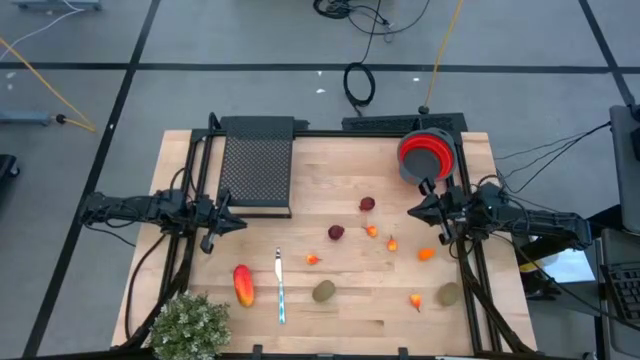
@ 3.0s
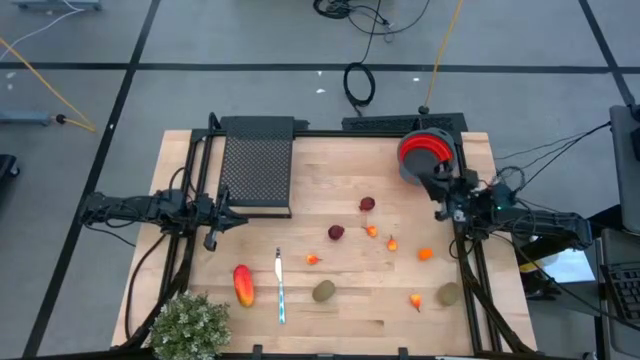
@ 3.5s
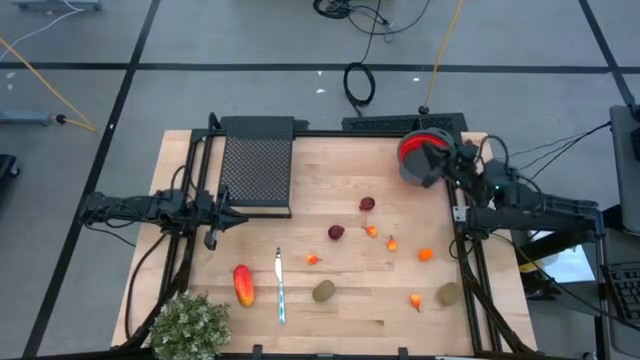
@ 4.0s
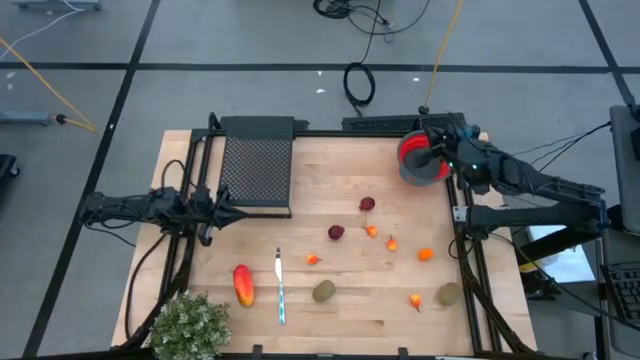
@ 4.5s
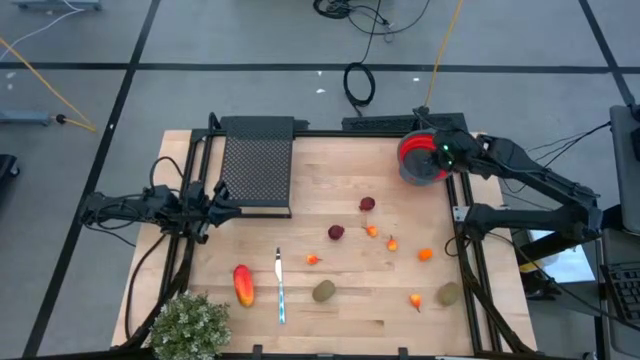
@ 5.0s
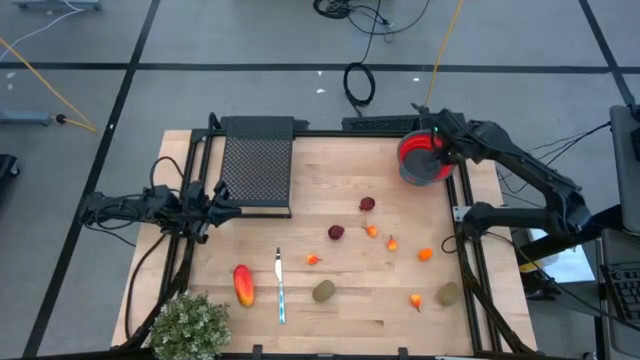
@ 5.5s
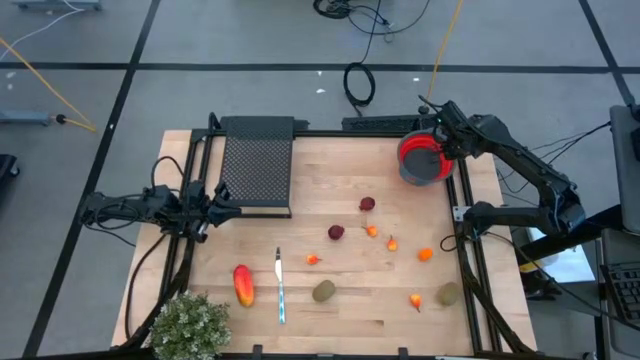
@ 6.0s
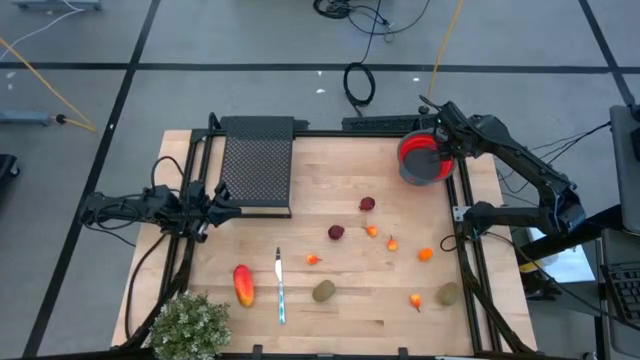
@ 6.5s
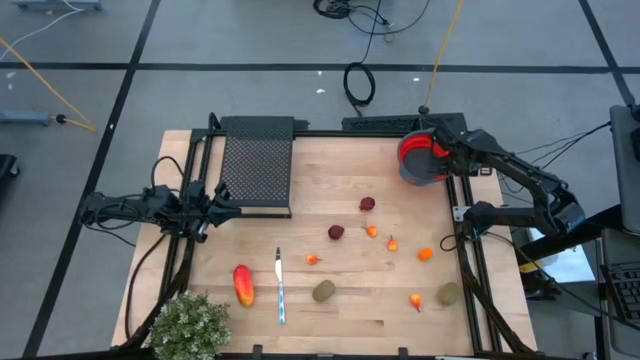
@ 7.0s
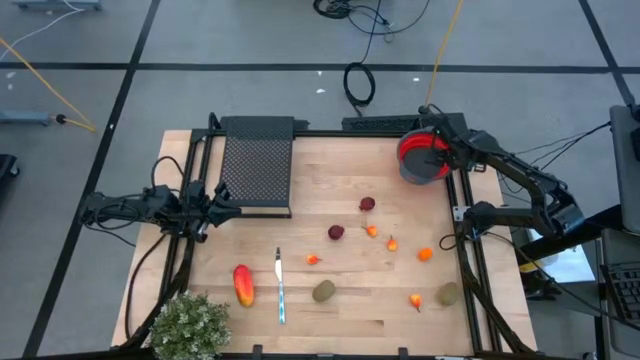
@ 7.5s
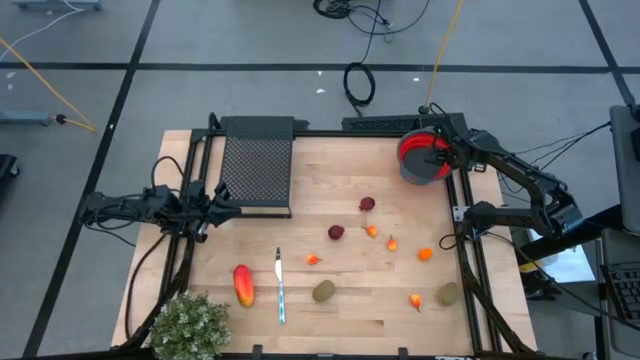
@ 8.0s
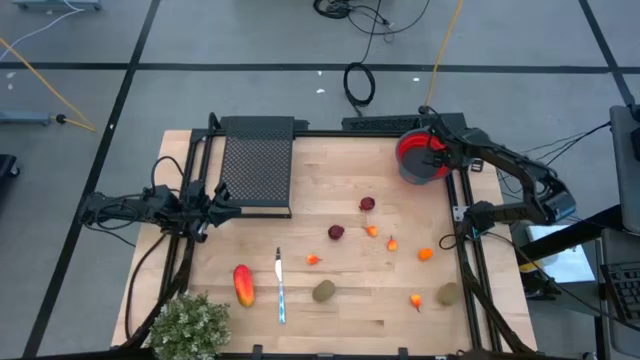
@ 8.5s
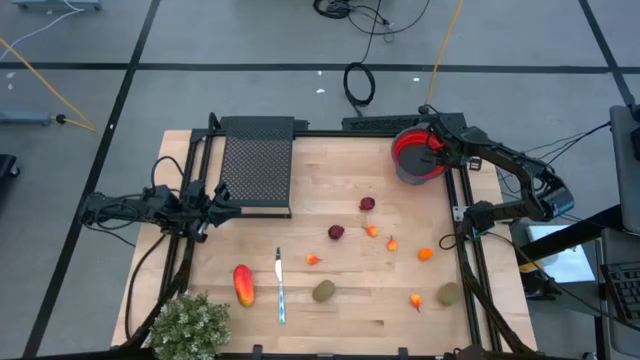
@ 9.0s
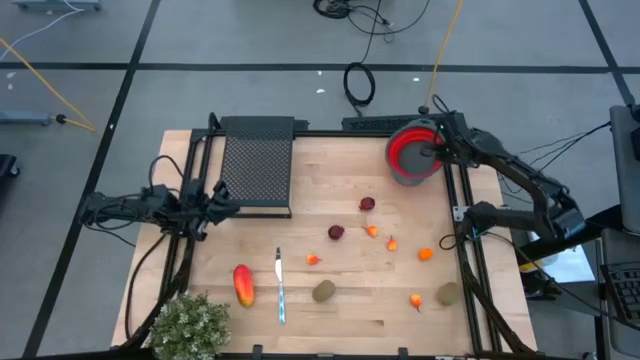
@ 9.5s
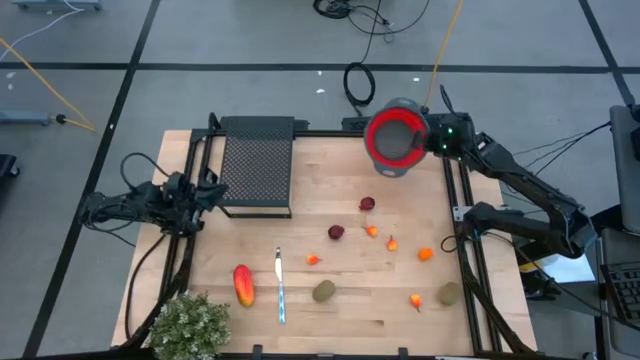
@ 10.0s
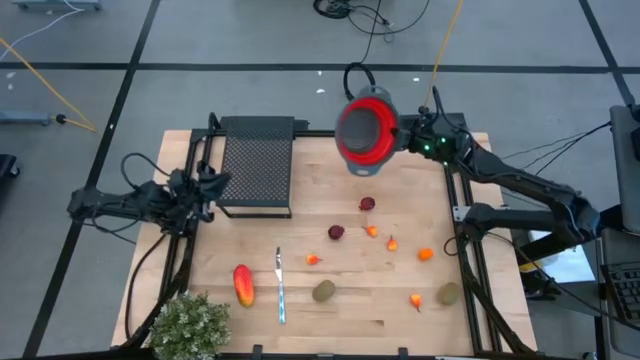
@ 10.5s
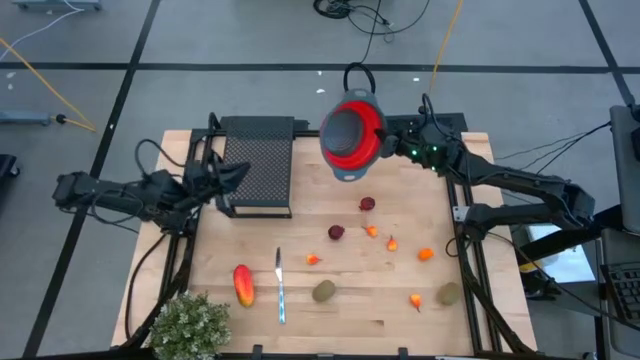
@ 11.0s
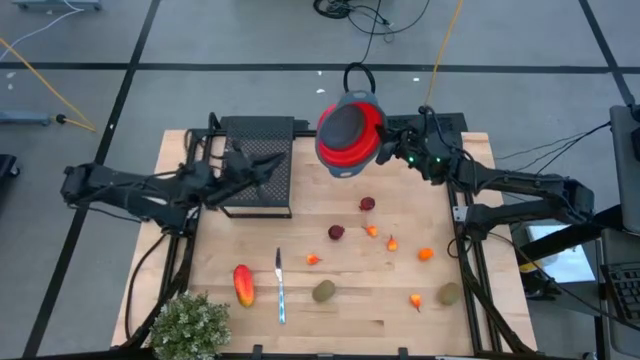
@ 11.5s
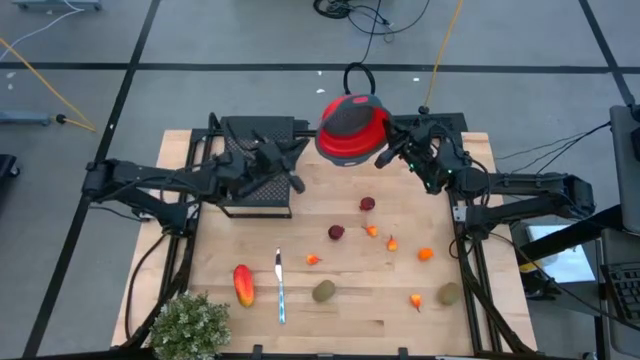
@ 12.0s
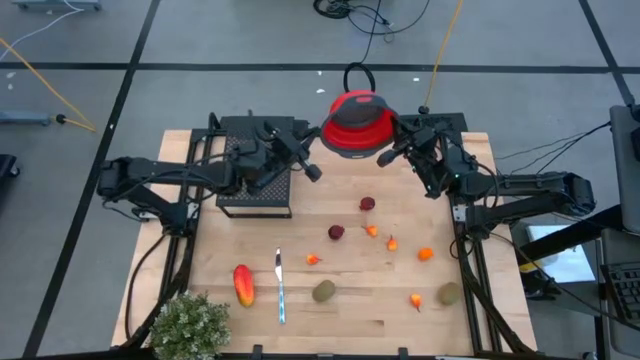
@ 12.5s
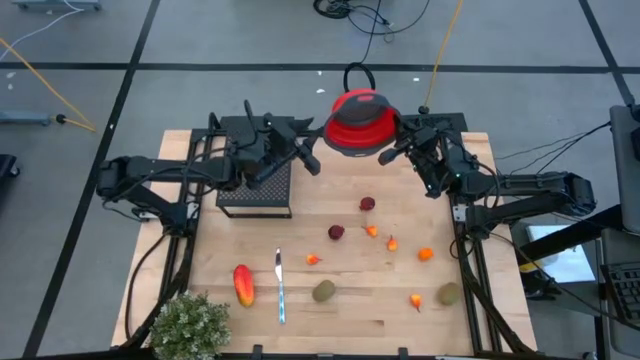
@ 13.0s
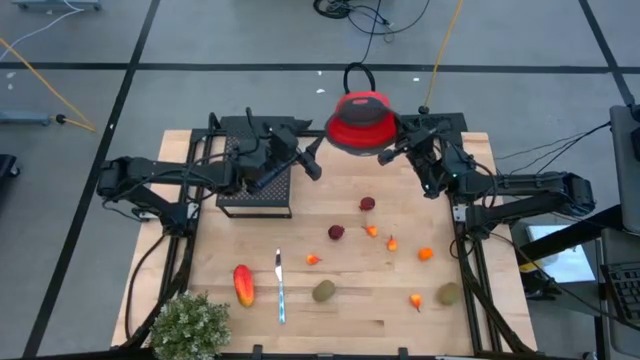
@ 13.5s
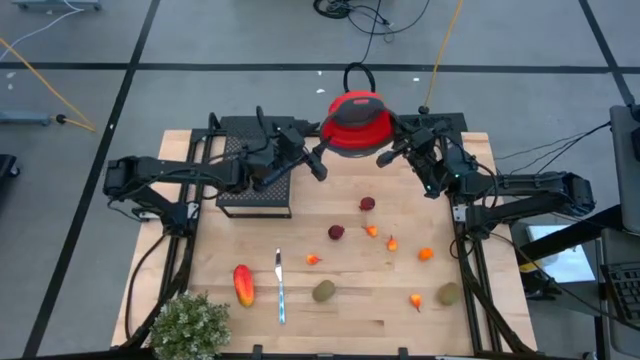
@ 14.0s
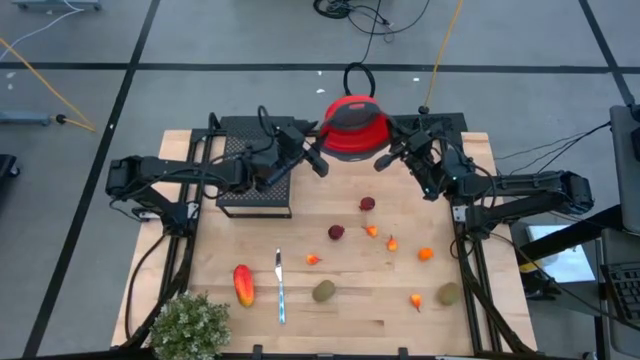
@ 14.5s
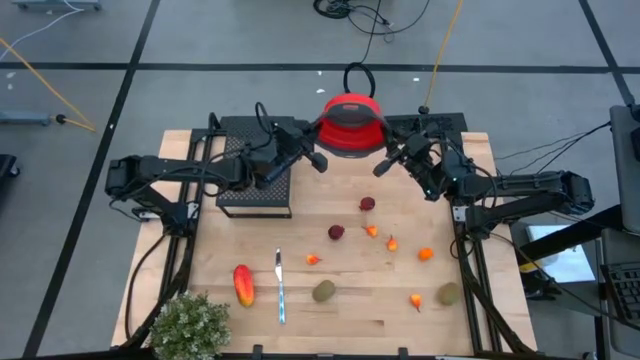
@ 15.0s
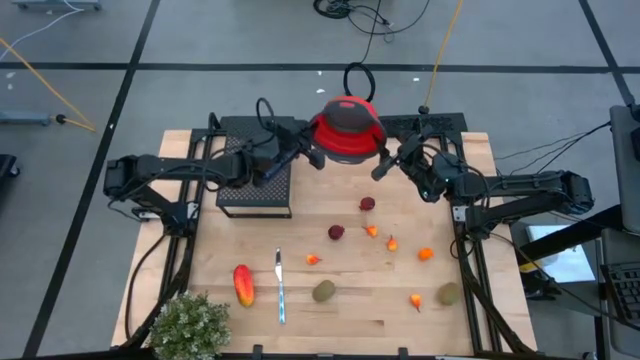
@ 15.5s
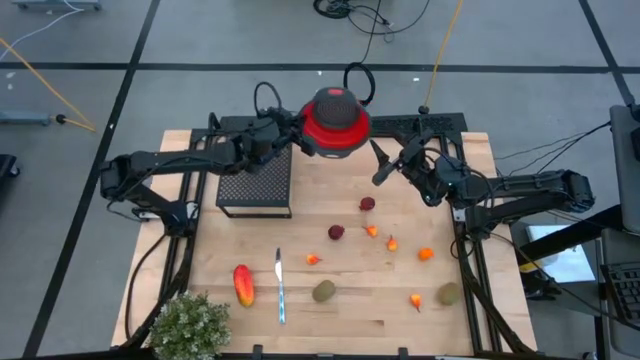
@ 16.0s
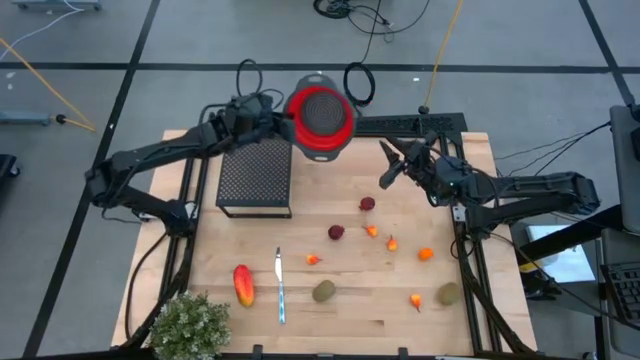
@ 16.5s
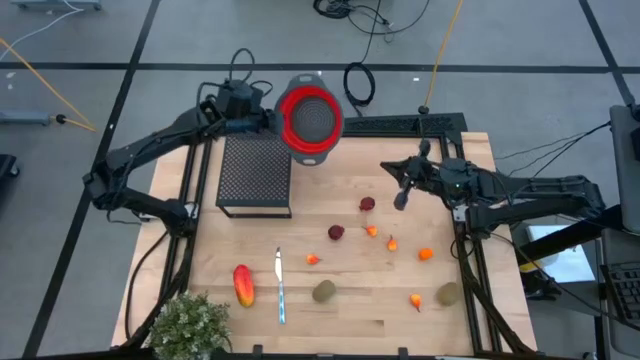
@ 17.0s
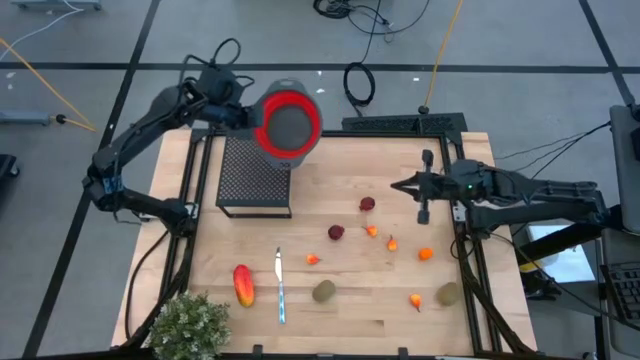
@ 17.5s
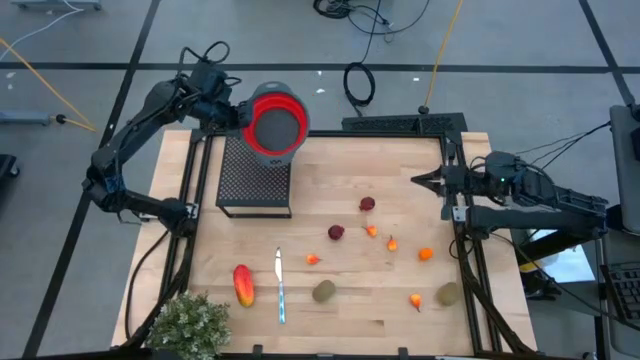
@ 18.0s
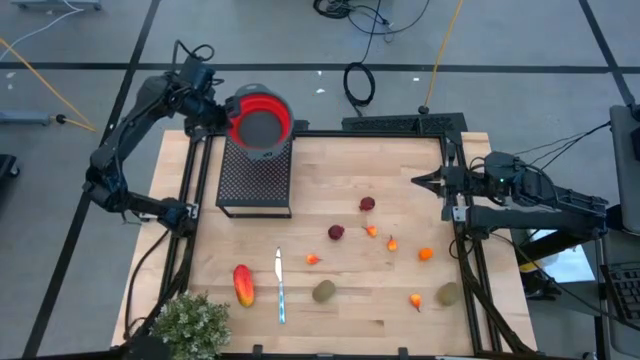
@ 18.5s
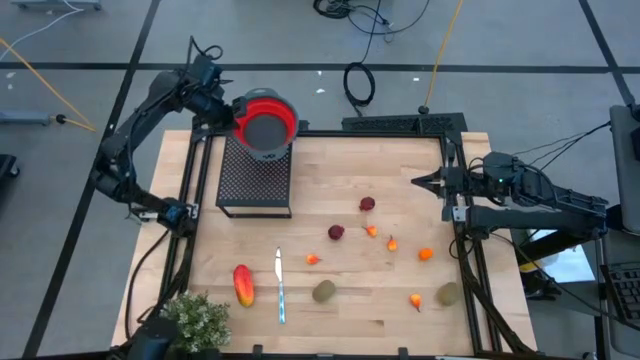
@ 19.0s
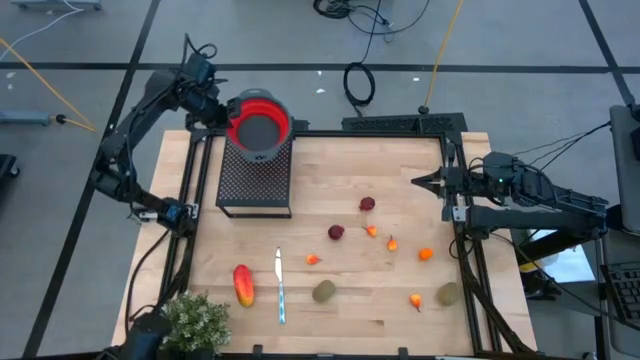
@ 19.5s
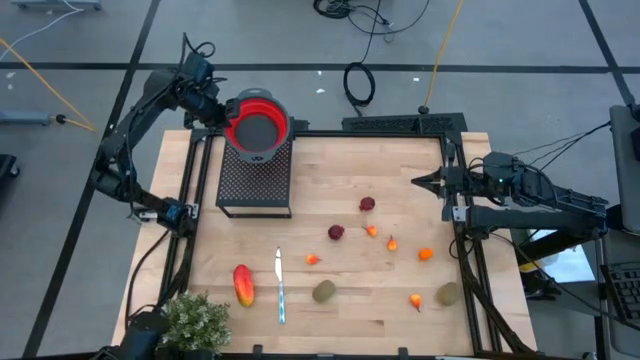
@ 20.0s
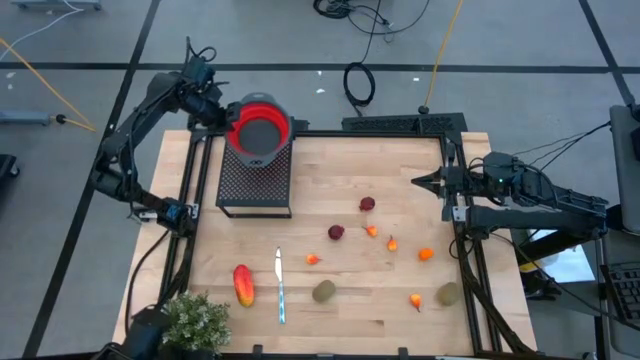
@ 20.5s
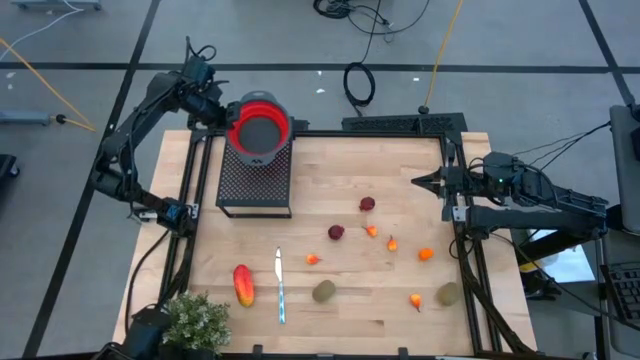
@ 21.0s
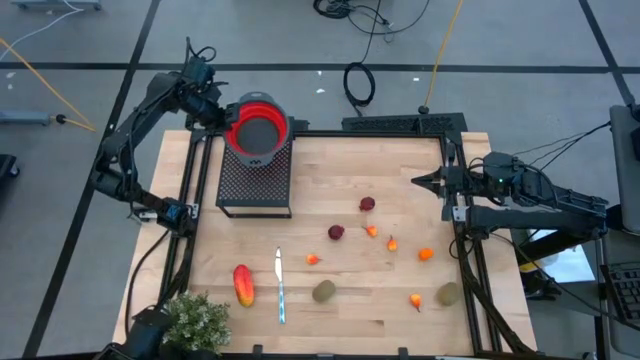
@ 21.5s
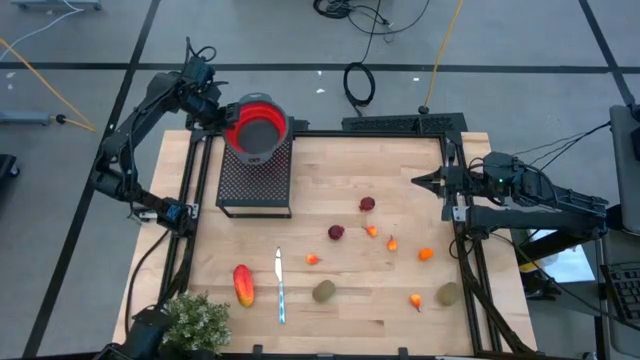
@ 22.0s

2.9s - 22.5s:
Task: Pick & Place Fruit
Put the red strainer bowl on the shelf
